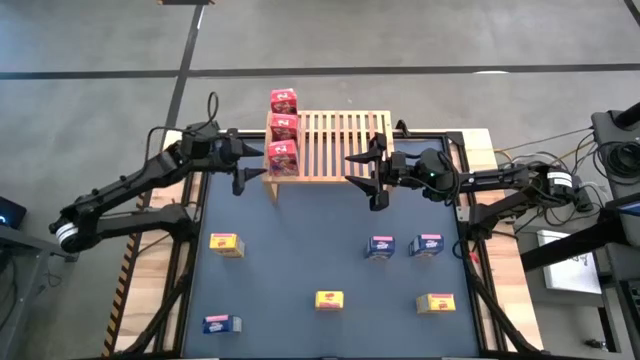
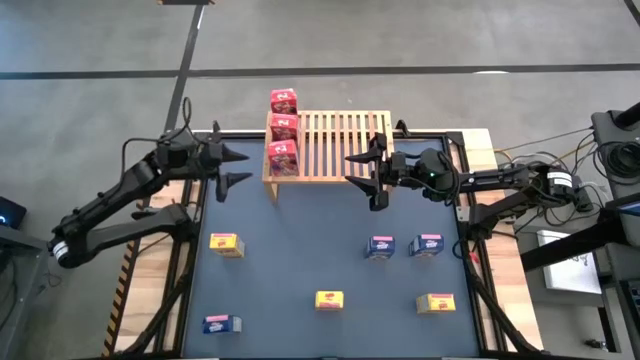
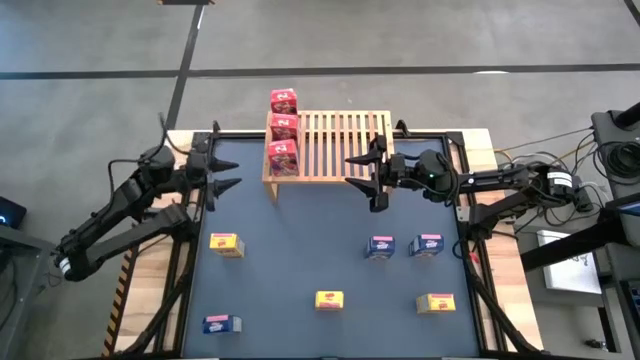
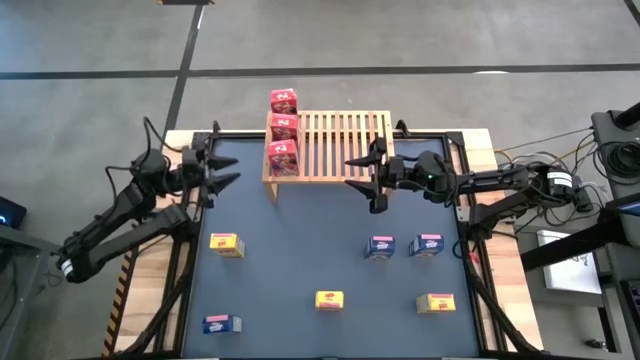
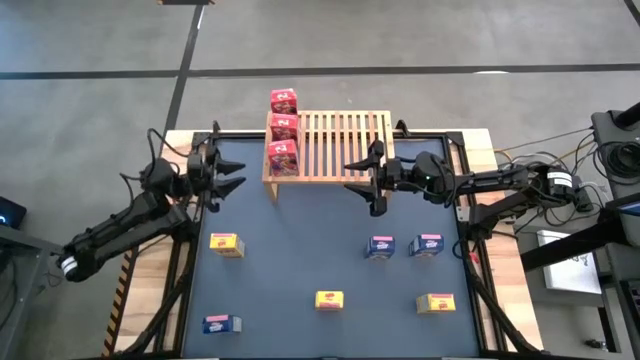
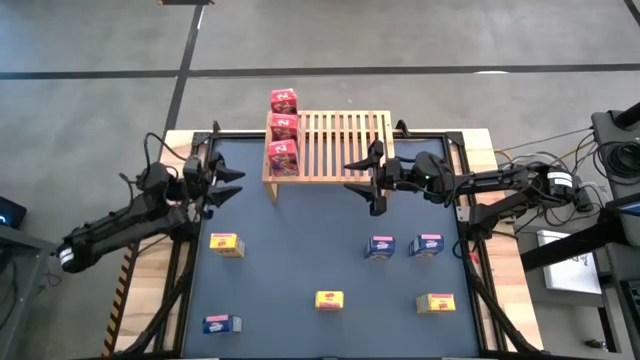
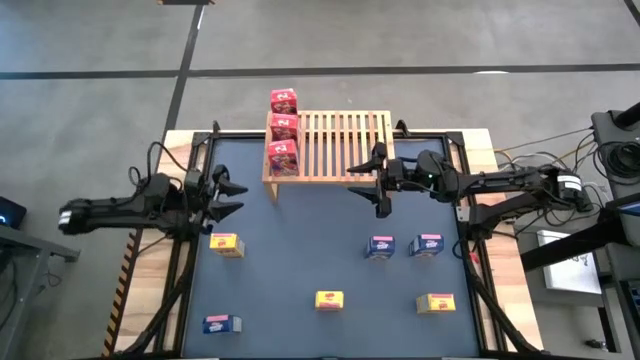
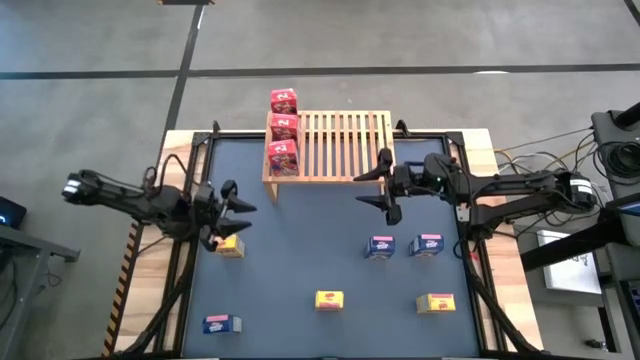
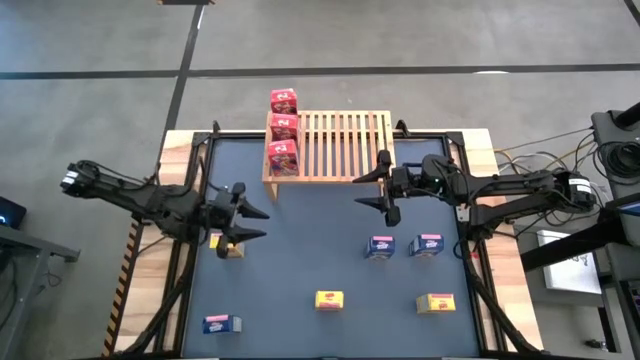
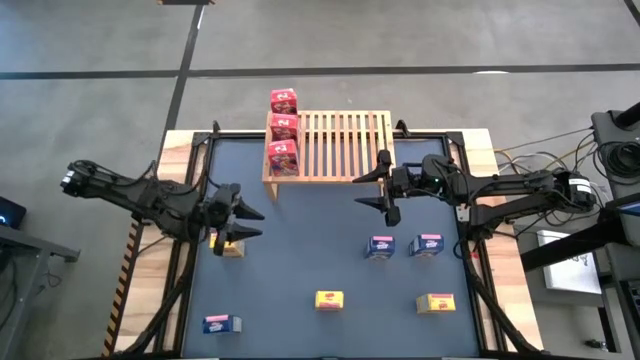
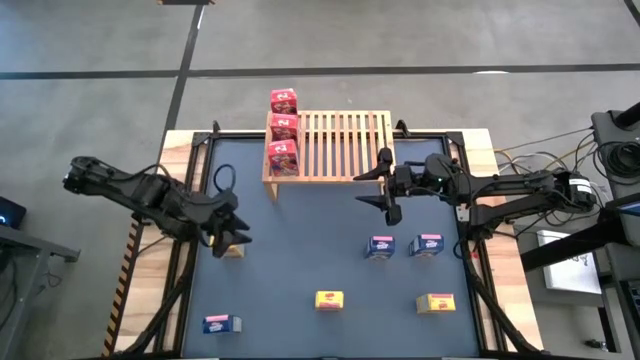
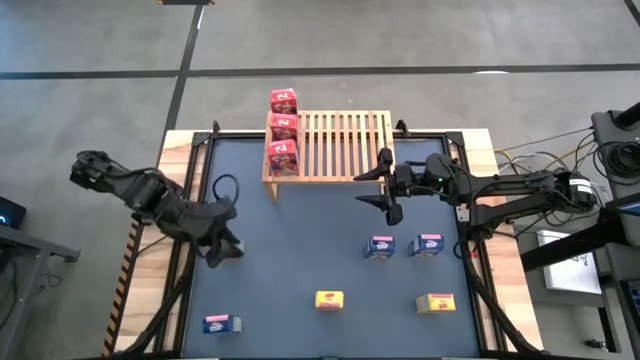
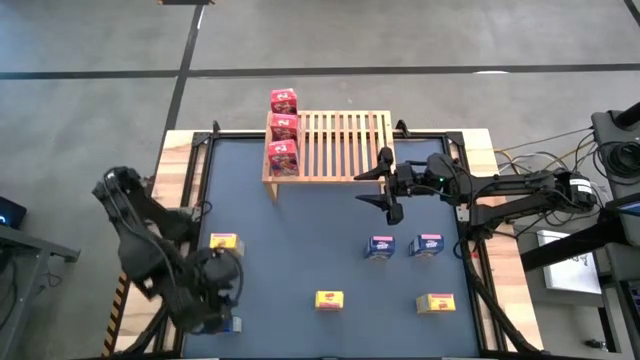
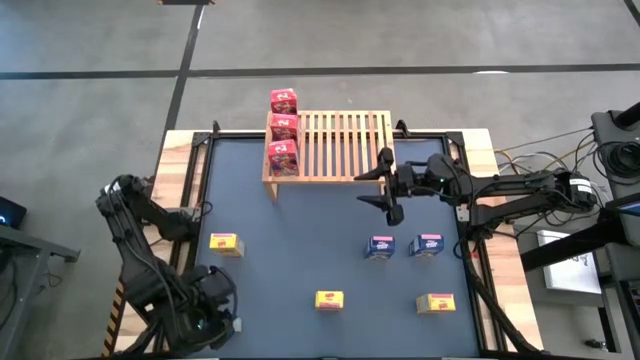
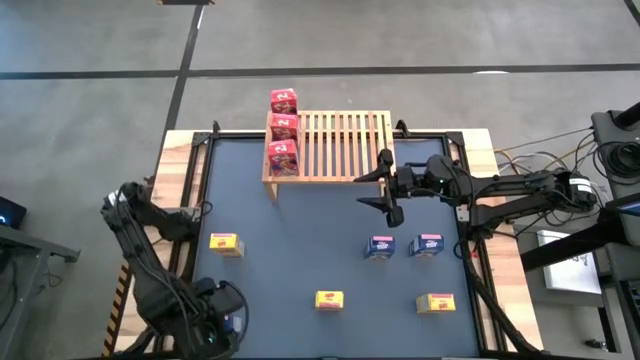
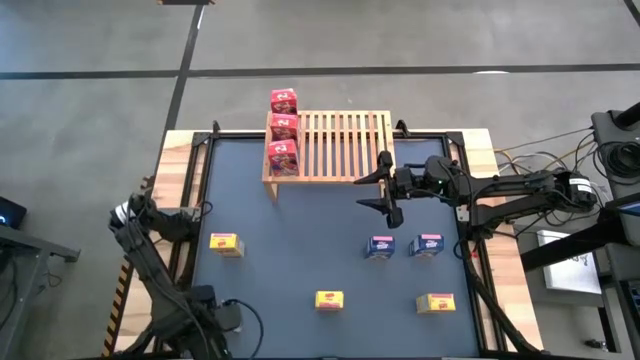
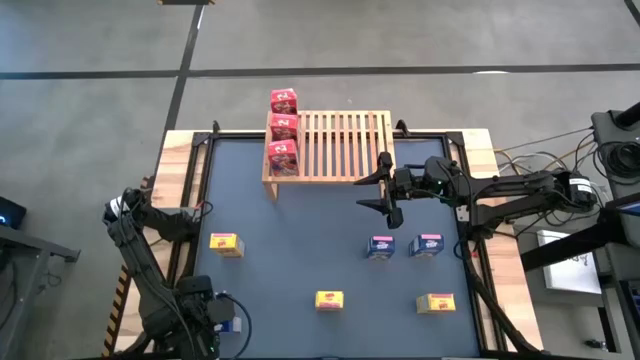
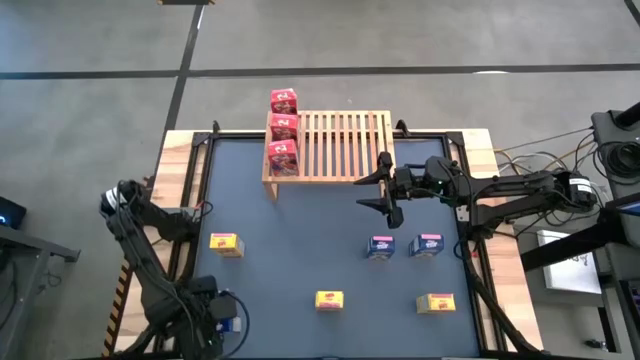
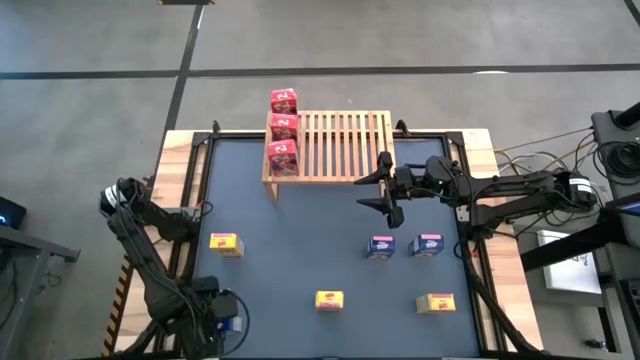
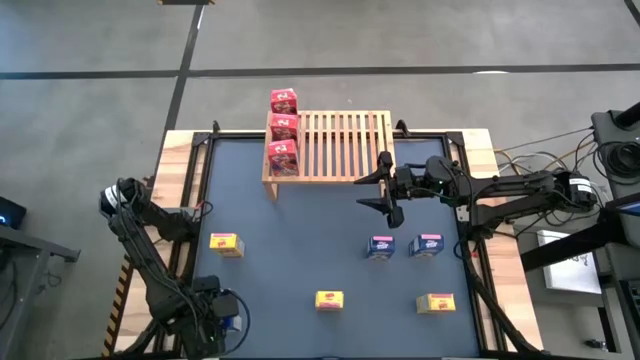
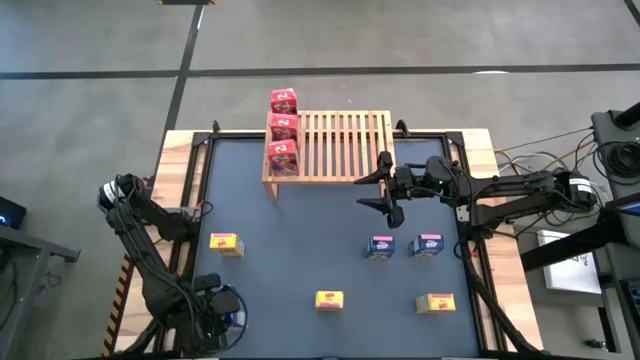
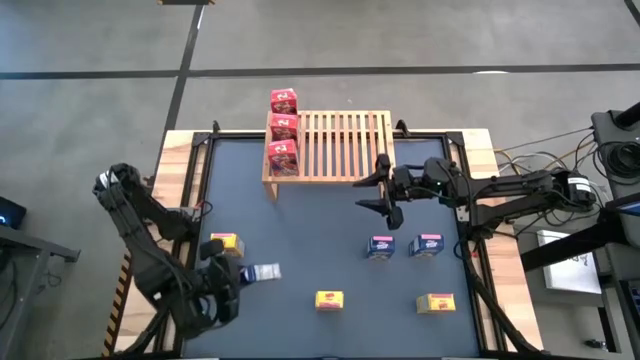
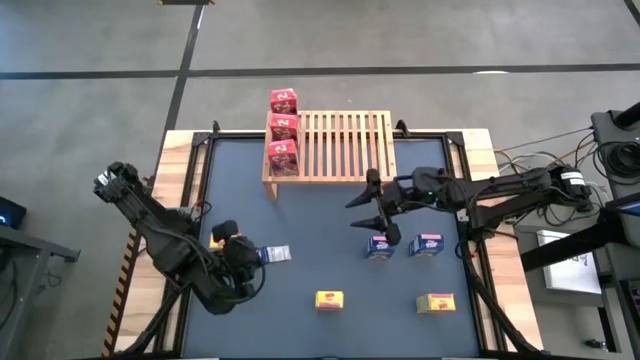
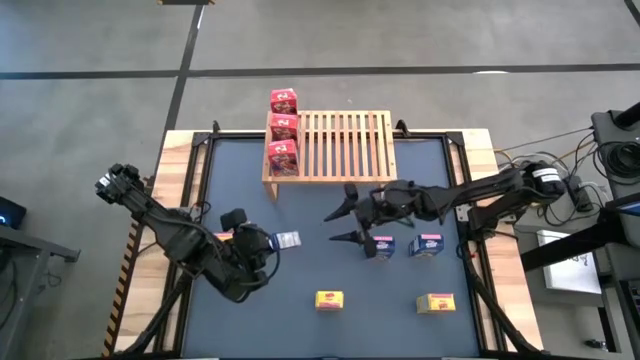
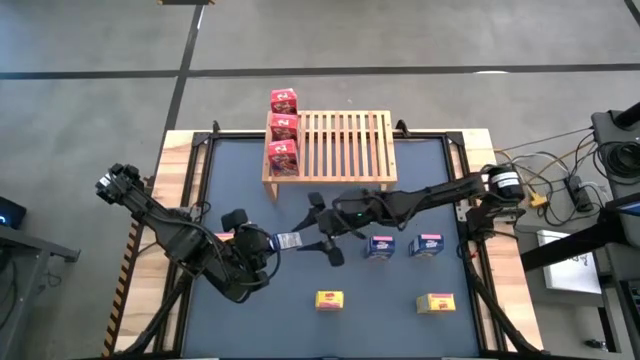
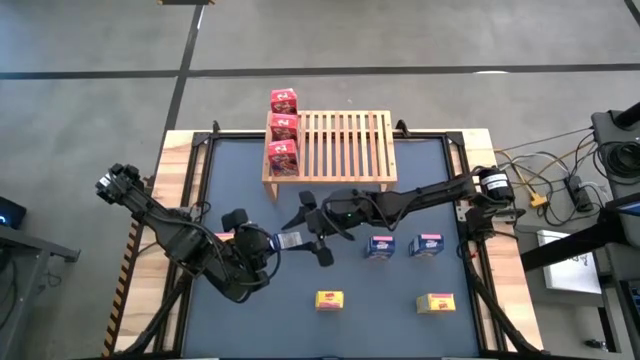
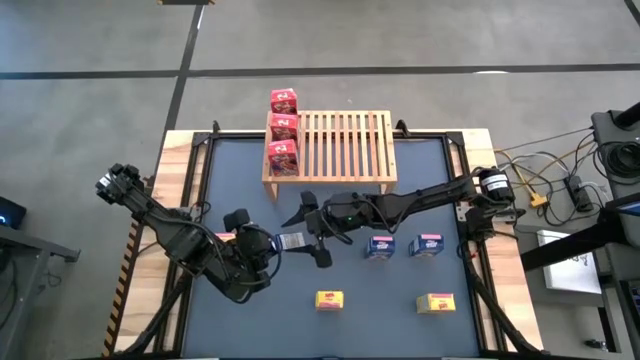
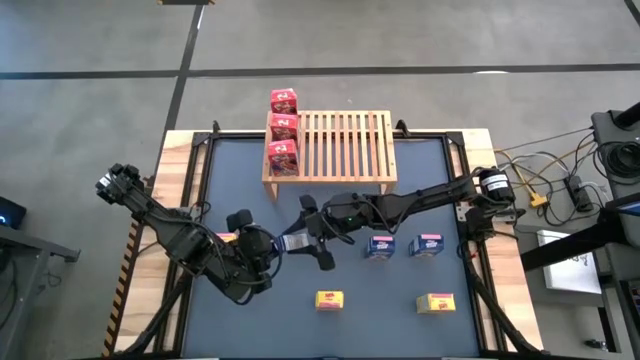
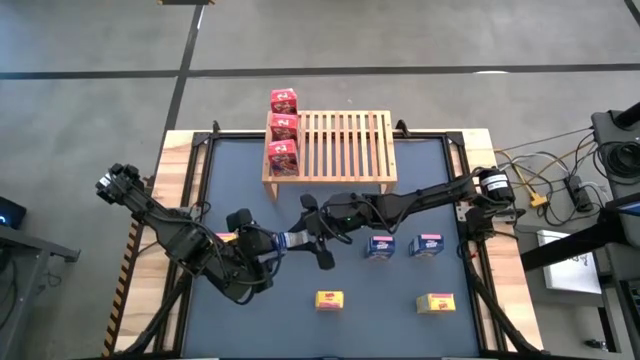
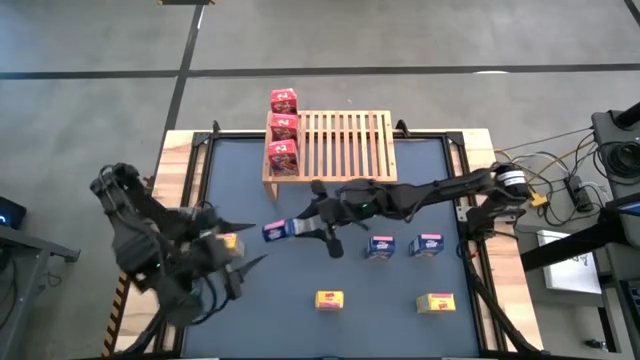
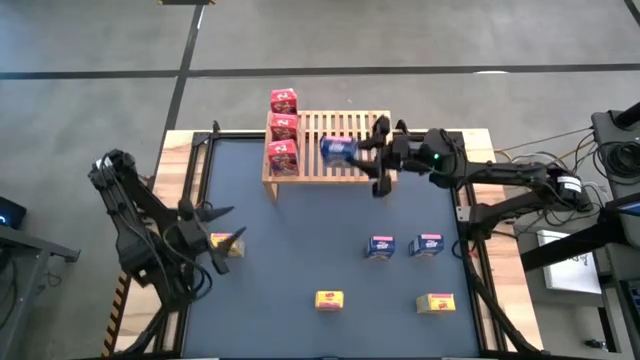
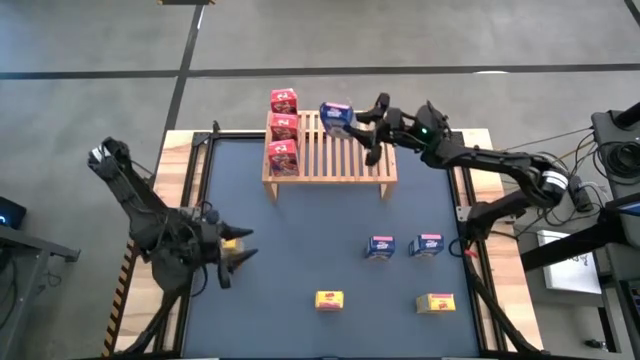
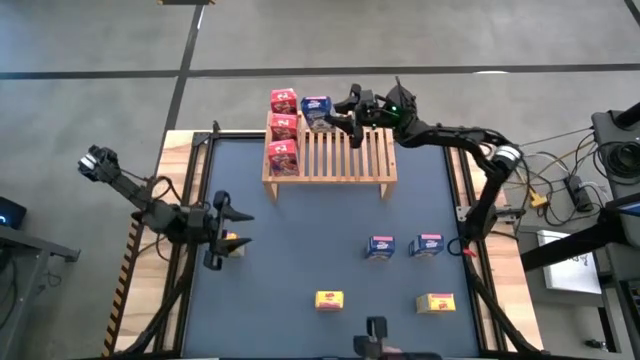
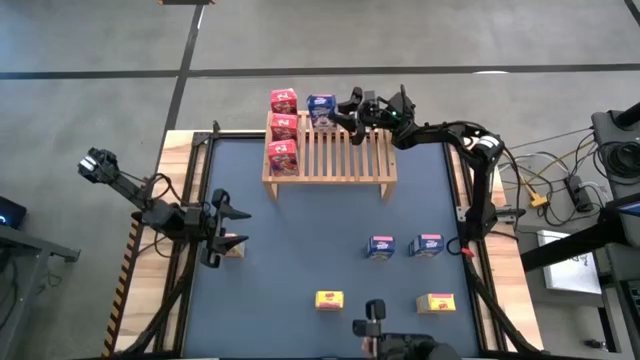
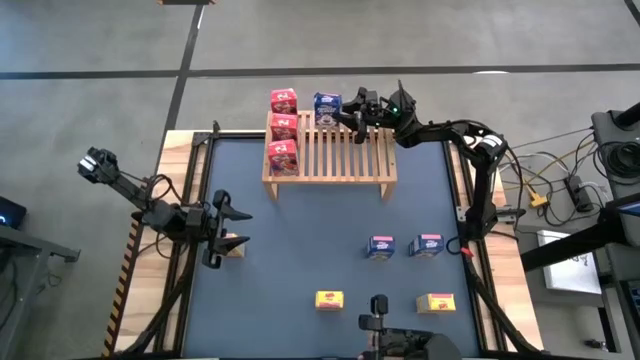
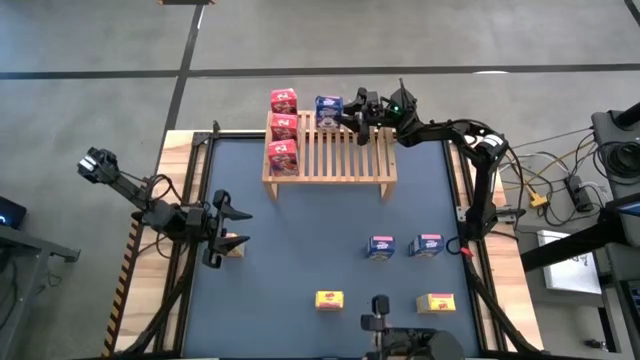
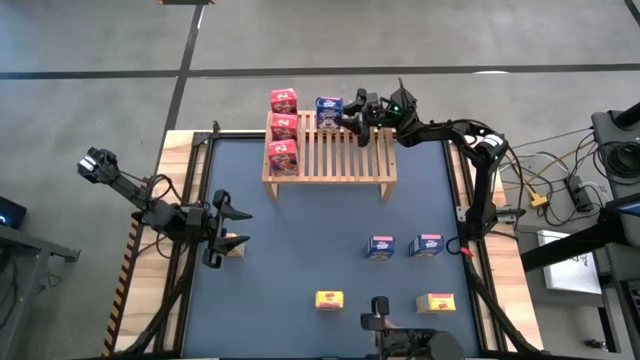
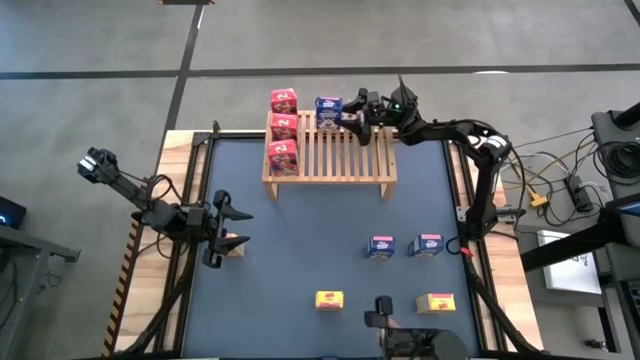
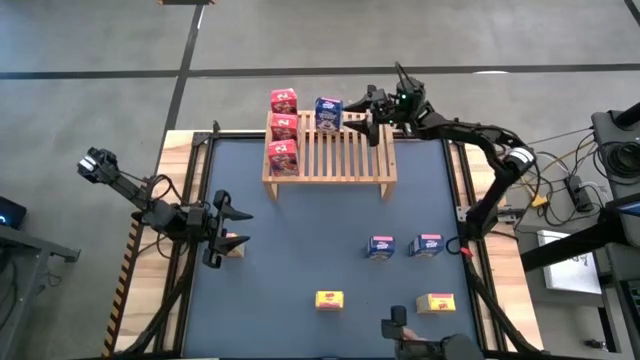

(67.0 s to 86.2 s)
Task: Stack cereal on shelf
Put the left blue cereal box on the shelf
